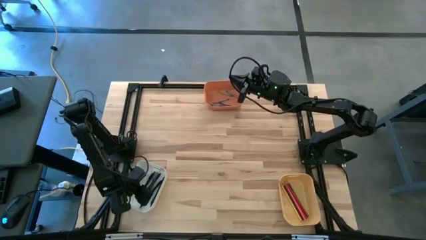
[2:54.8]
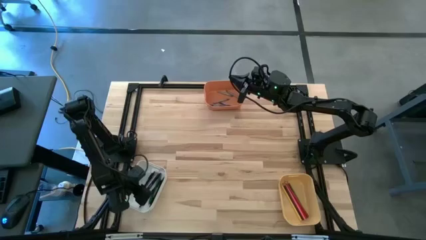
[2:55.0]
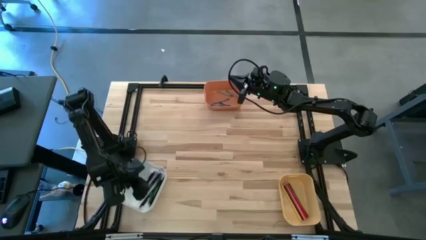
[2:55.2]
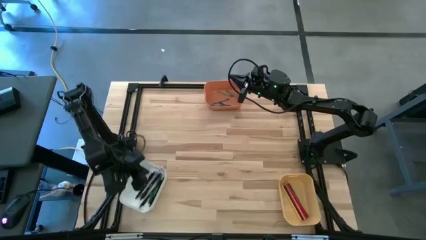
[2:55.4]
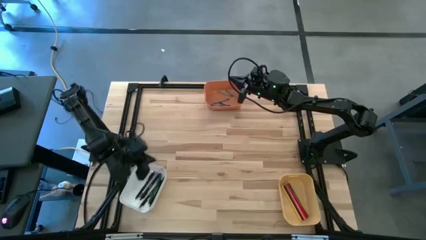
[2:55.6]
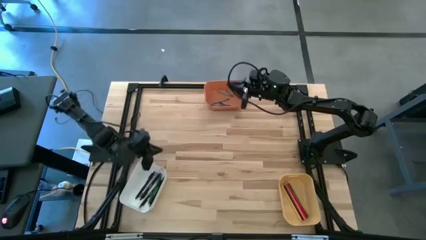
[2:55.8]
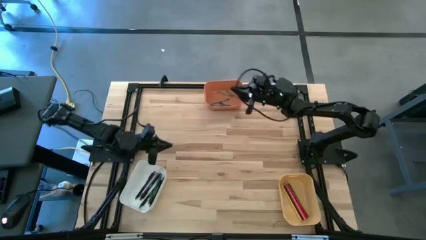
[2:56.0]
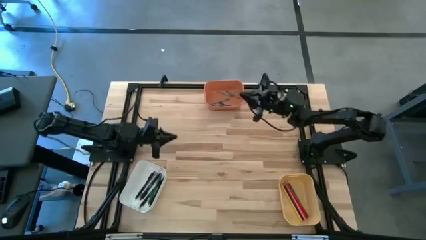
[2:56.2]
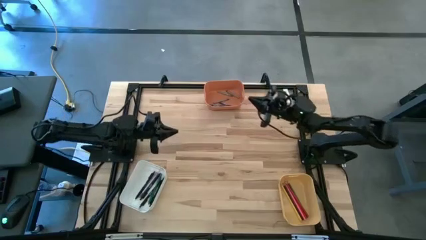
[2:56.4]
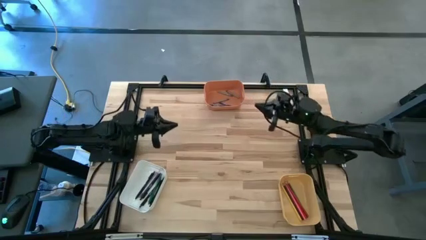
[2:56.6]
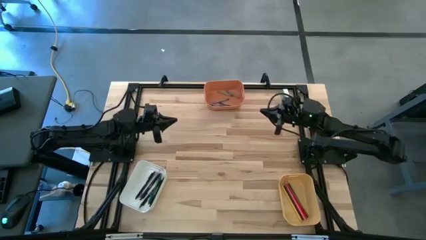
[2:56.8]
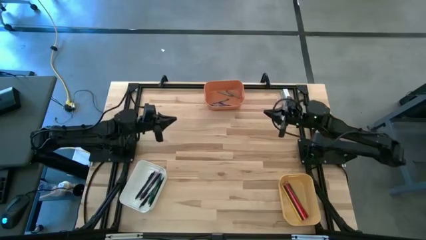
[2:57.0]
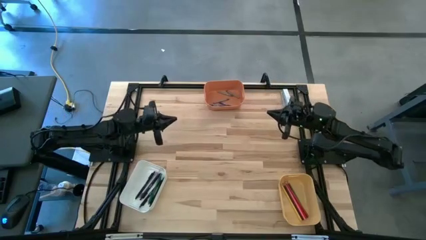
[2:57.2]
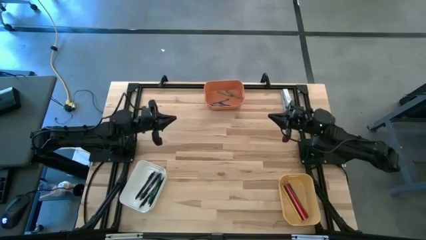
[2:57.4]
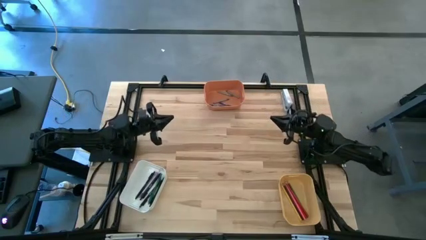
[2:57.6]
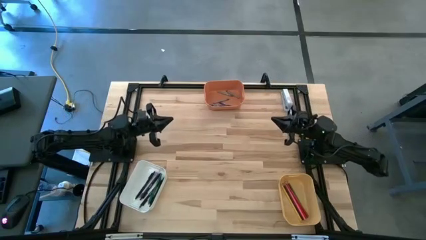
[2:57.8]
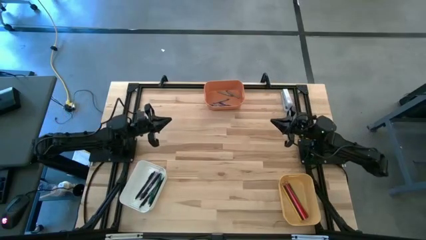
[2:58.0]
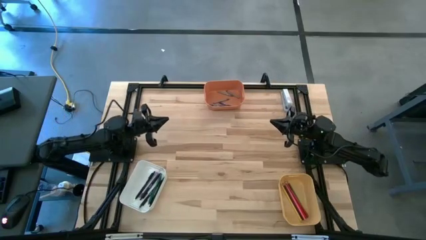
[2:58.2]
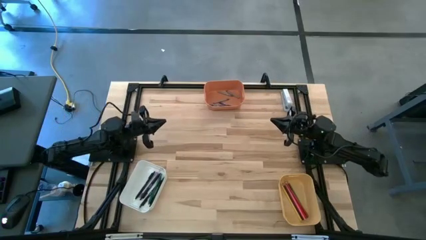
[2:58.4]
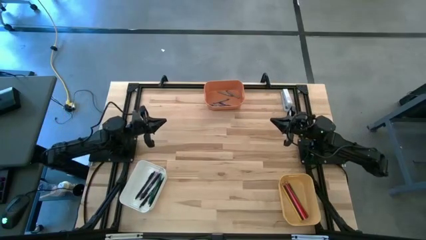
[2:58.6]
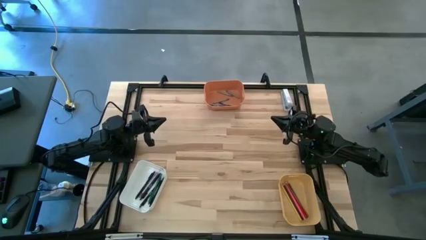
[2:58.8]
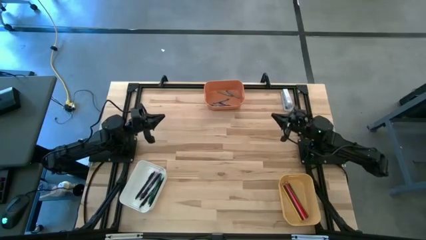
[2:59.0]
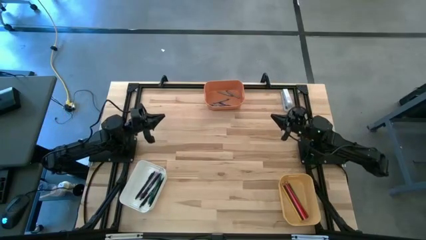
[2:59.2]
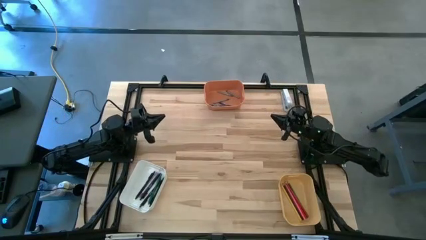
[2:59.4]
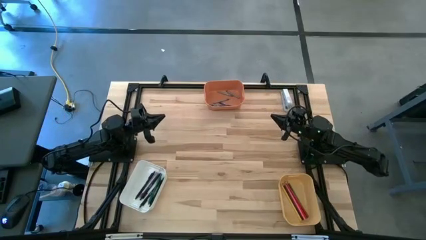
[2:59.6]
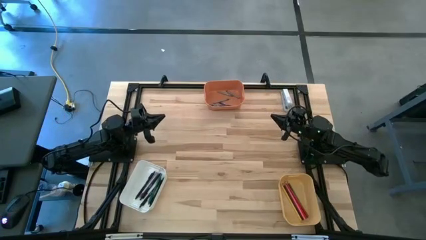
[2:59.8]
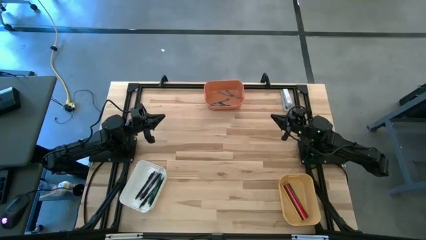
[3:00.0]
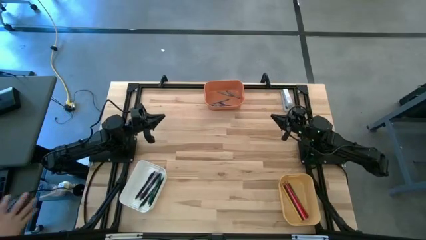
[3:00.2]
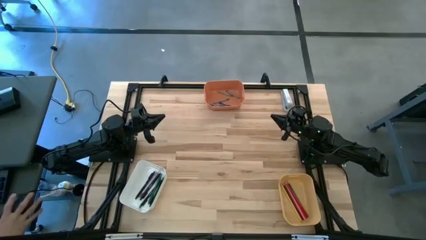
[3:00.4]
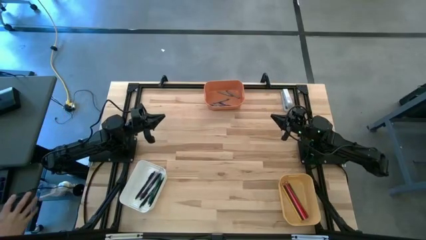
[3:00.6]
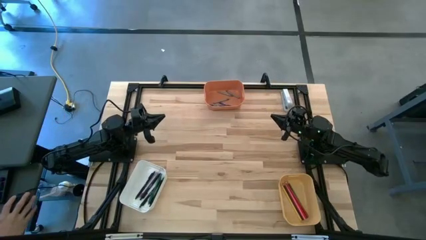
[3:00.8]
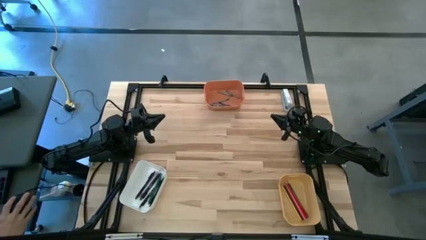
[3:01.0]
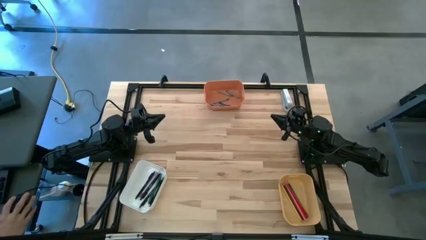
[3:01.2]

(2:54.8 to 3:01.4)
Task: Sort crayons/erasers/pens/pencils in bins
Return to Home Position

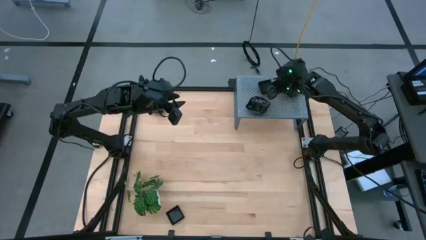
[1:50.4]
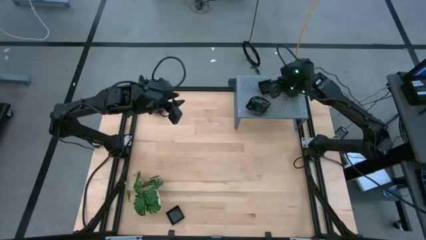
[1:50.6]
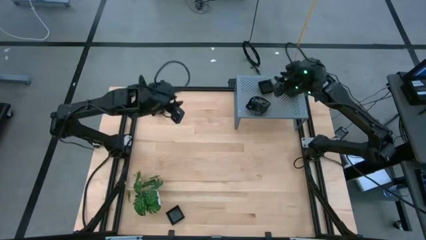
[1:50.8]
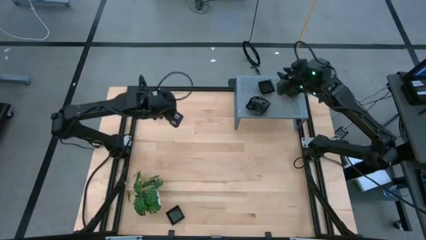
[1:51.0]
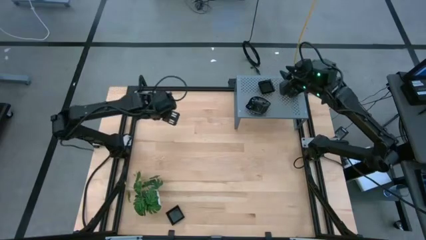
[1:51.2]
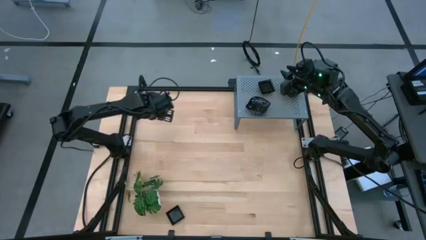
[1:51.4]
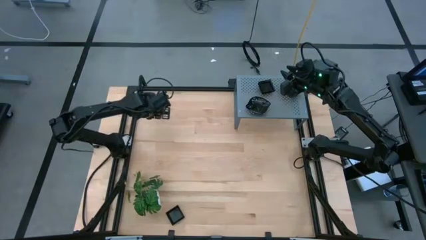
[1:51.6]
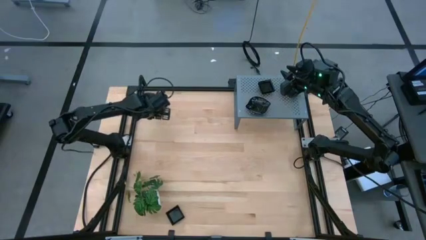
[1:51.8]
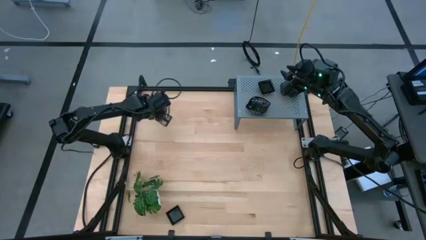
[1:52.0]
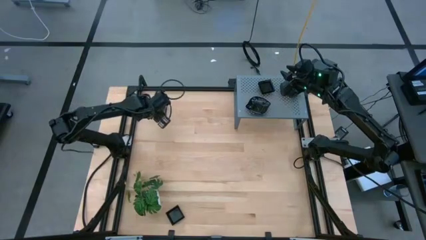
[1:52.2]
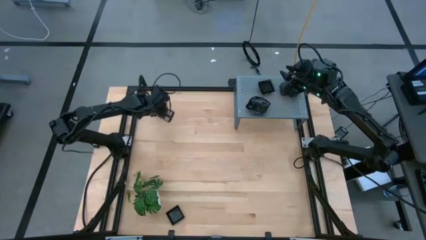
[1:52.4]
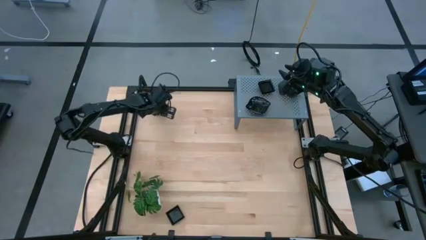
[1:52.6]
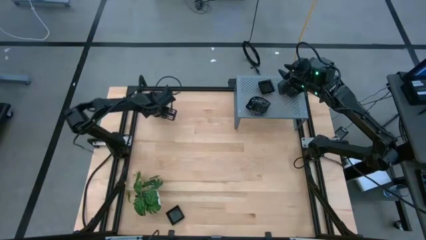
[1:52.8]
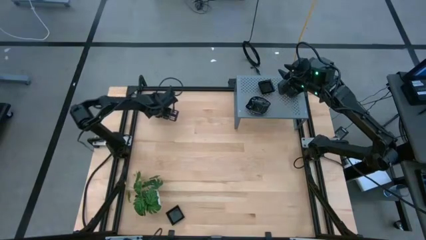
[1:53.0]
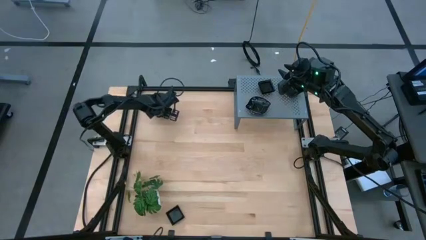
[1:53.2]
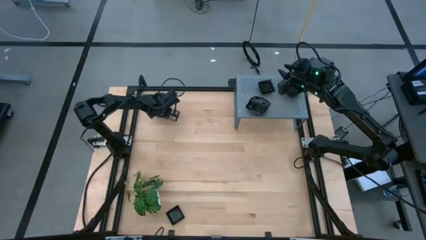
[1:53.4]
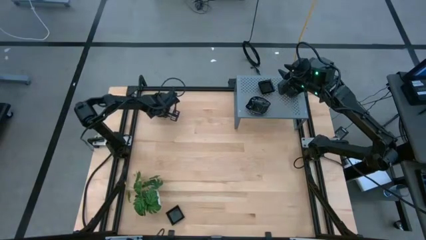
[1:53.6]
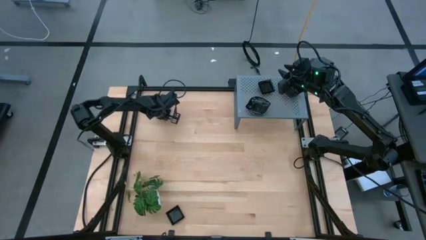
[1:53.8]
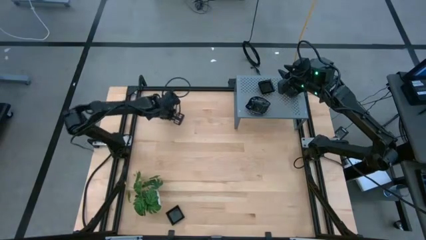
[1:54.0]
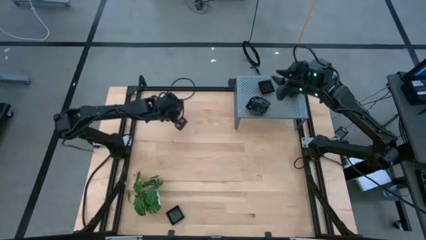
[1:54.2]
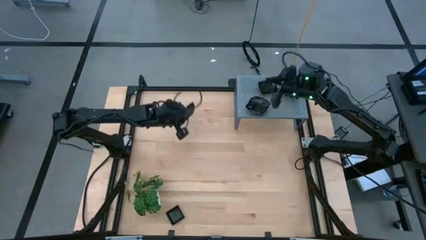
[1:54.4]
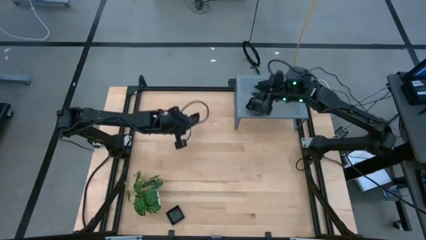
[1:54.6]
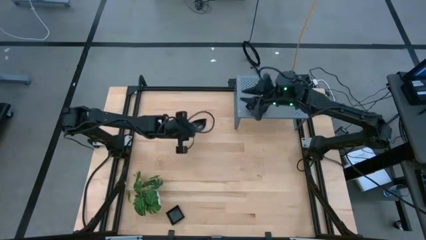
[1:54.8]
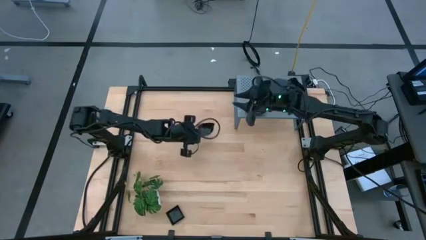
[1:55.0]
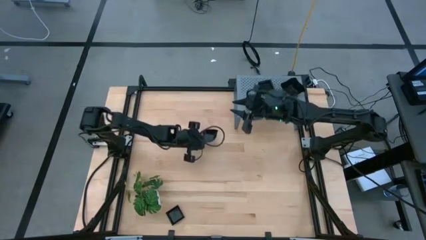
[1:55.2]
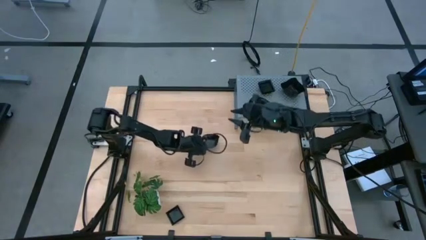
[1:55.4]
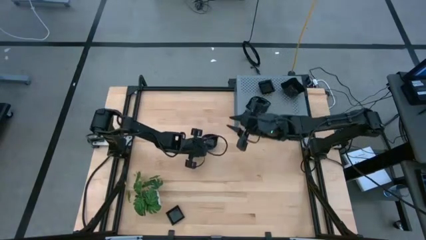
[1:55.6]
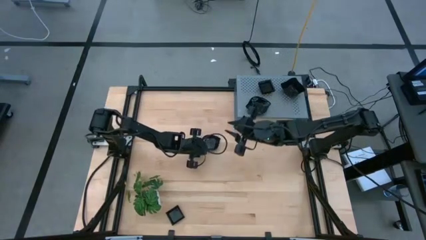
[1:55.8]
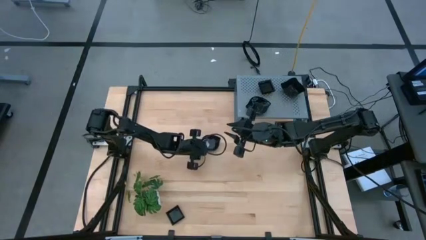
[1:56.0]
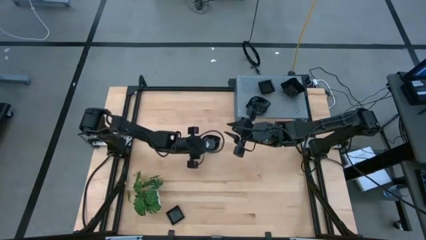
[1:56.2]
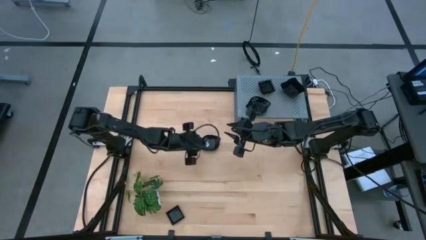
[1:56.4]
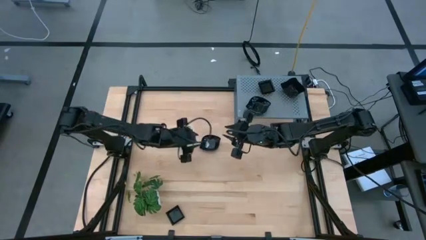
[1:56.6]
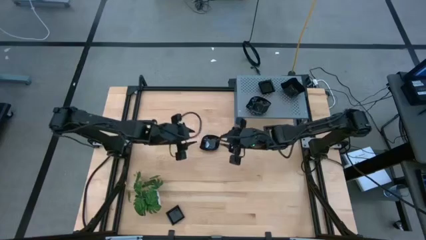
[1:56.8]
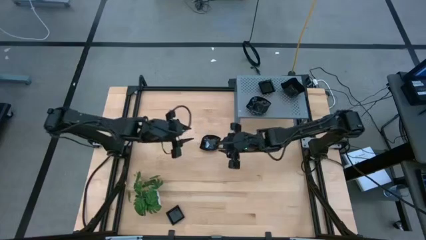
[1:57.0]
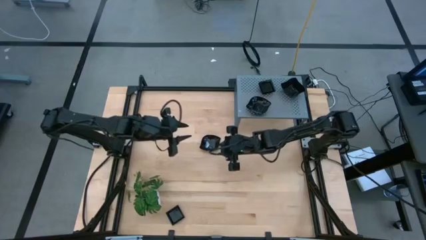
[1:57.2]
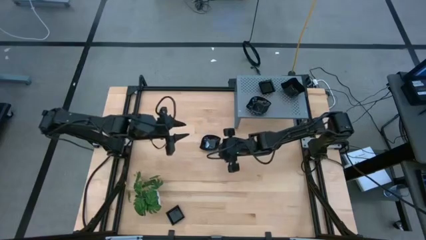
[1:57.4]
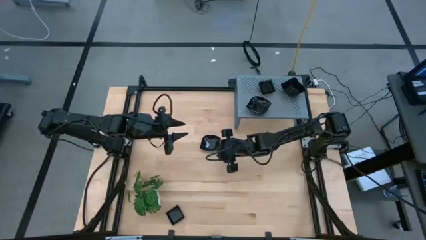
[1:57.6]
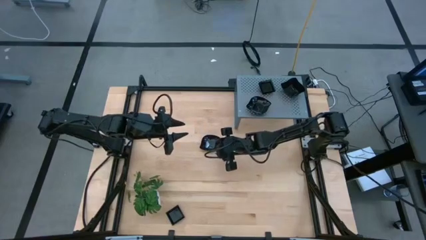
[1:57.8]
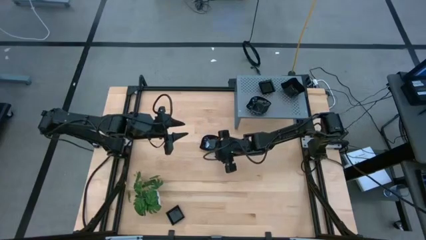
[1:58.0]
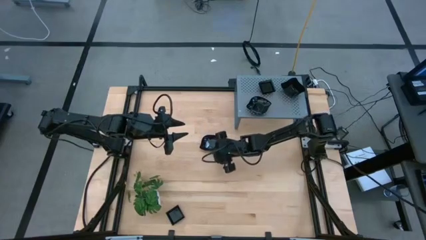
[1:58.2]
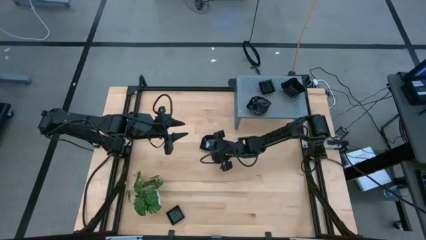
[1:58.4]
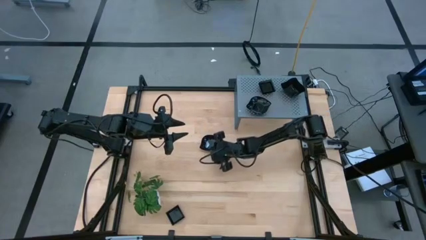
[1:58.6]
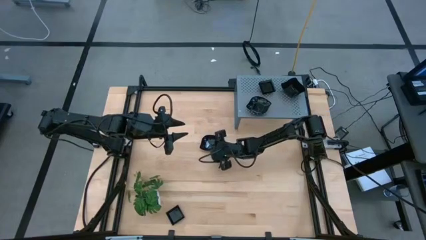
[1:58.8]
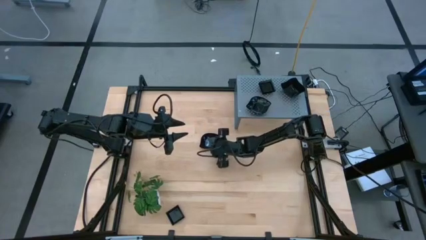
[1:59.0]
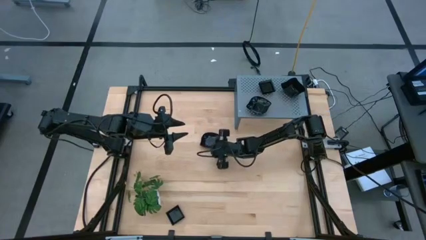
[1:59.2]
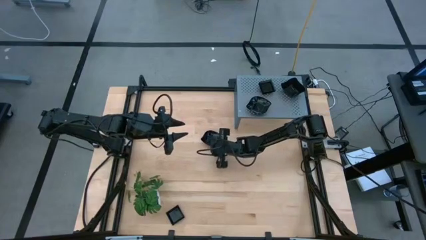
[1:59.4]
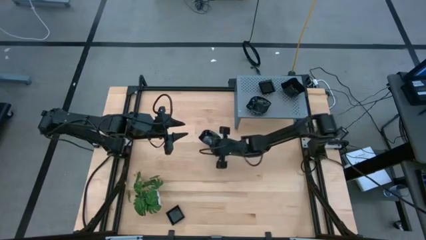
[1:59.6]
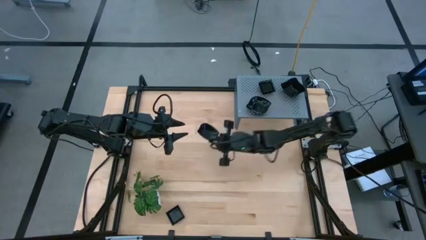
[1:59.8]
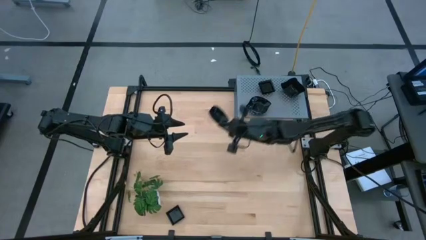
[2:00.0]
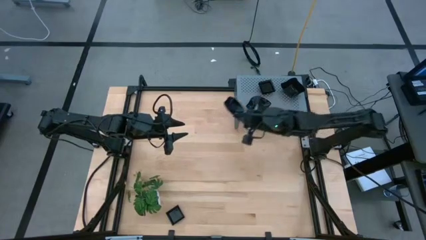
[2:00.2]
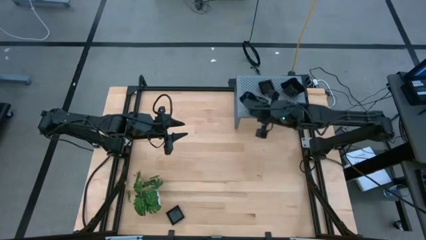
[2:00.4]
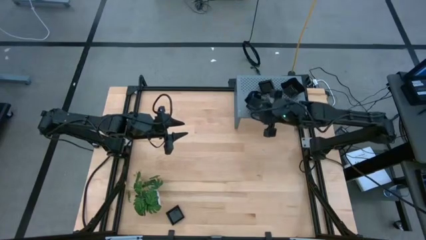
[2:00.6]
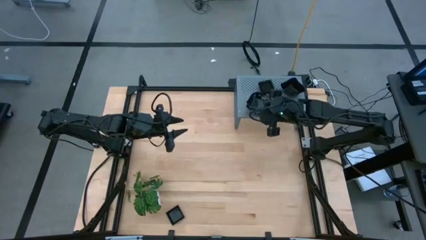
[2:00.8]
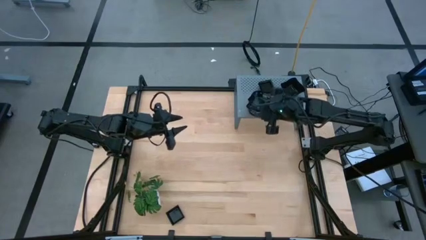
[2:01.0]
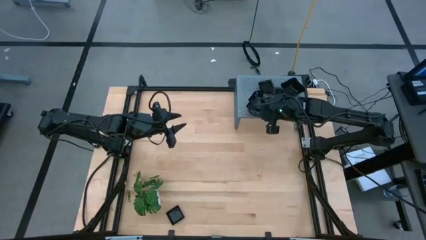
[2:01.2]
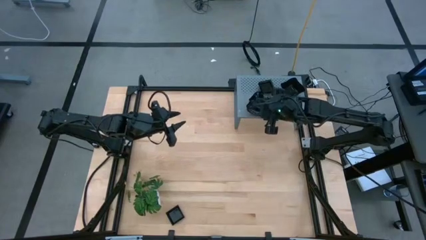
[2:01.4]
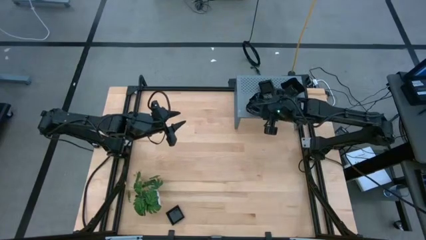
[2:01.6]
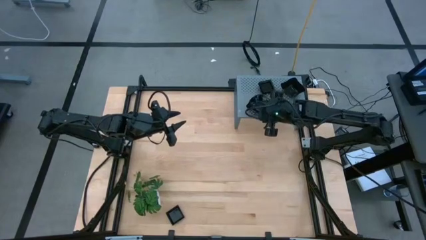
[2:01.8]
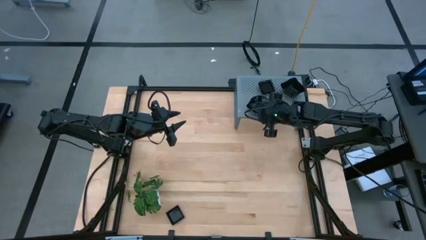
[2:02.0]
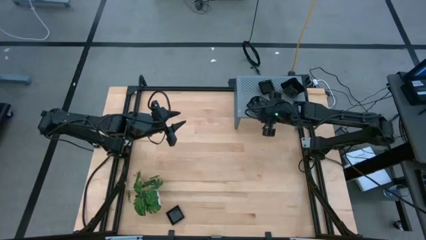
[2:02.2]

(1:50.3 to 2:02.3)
Task: Pick & Place Mini shaped plates
Stack the leaf-shaped plate on top of the other leaf-shaped plates
